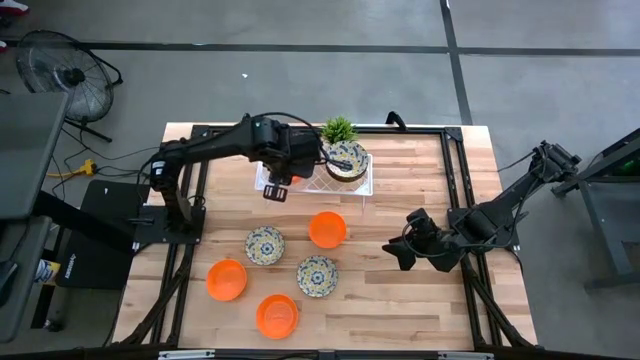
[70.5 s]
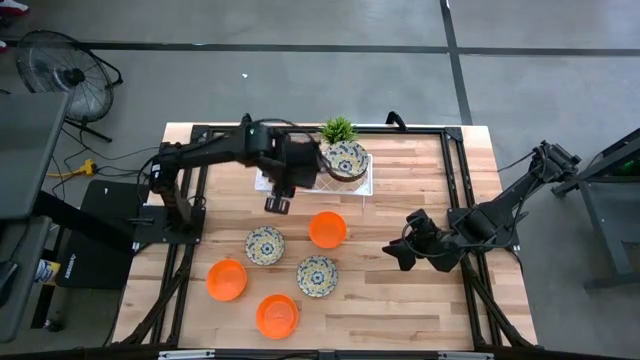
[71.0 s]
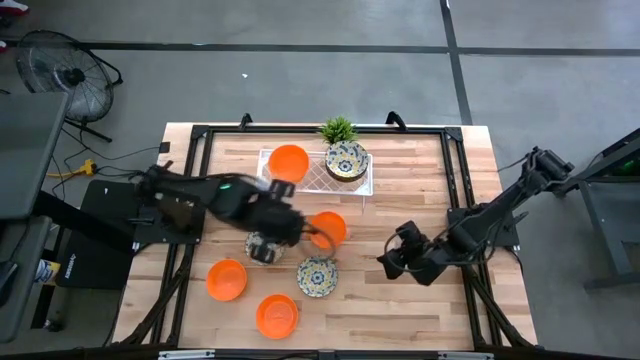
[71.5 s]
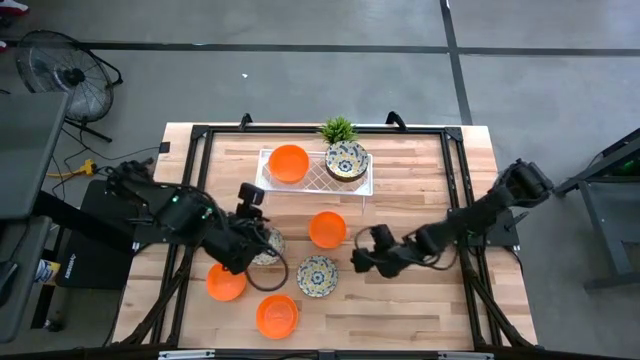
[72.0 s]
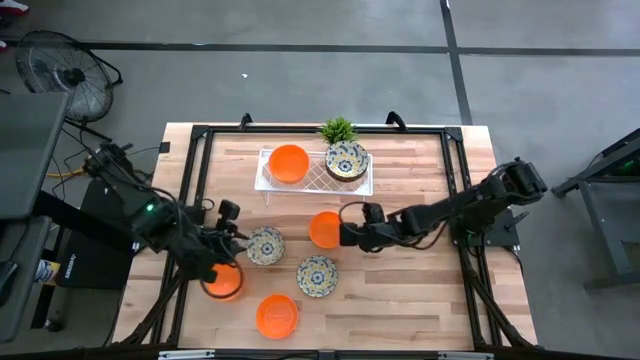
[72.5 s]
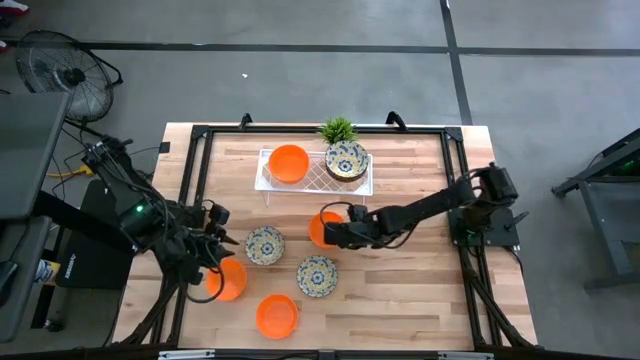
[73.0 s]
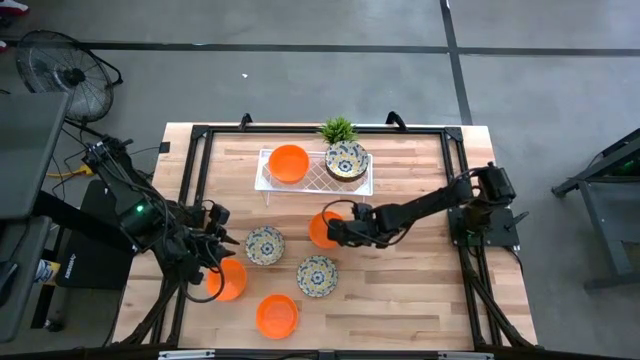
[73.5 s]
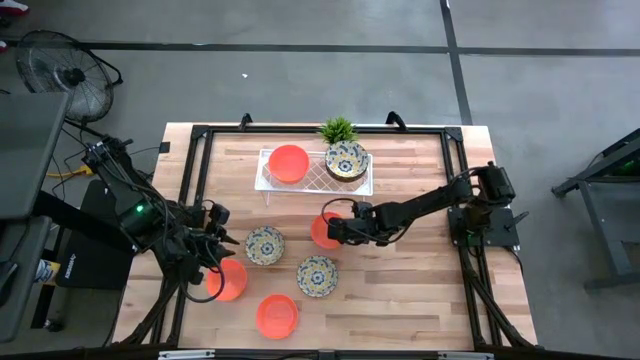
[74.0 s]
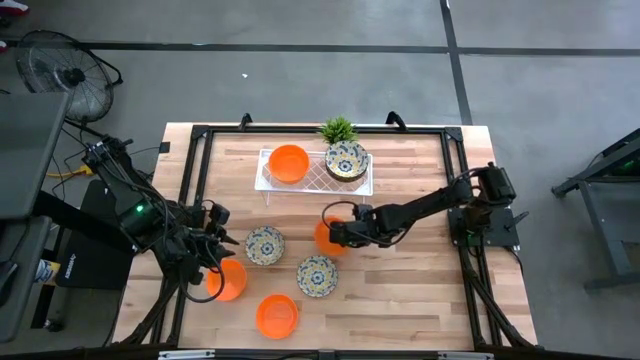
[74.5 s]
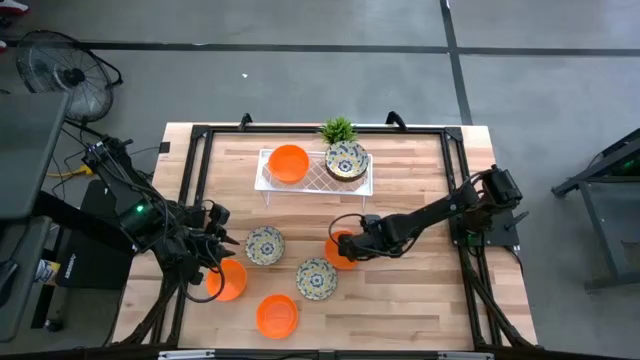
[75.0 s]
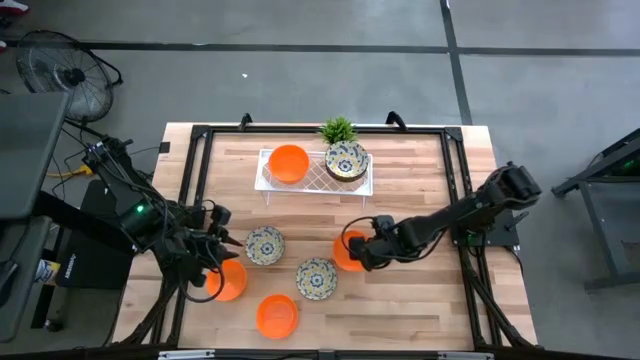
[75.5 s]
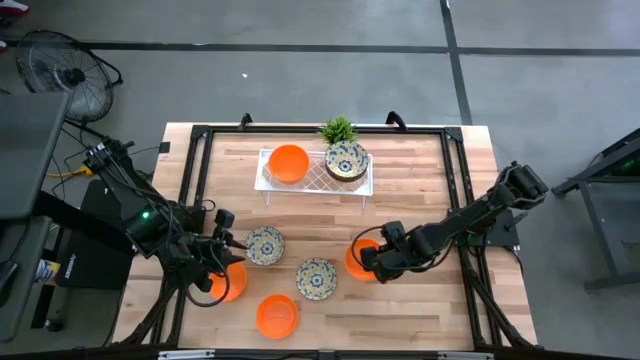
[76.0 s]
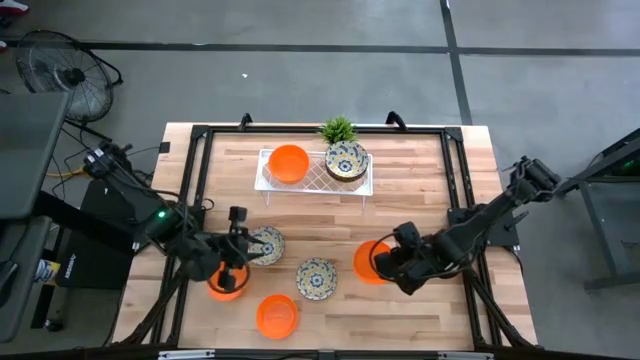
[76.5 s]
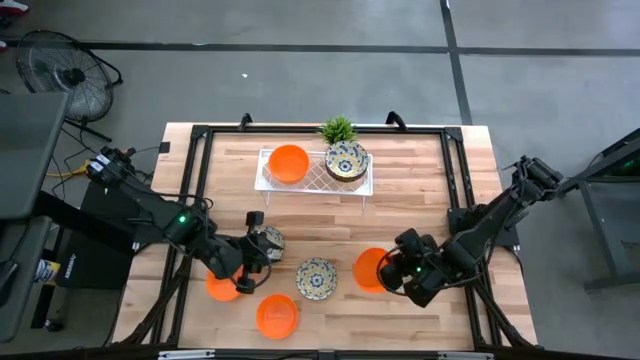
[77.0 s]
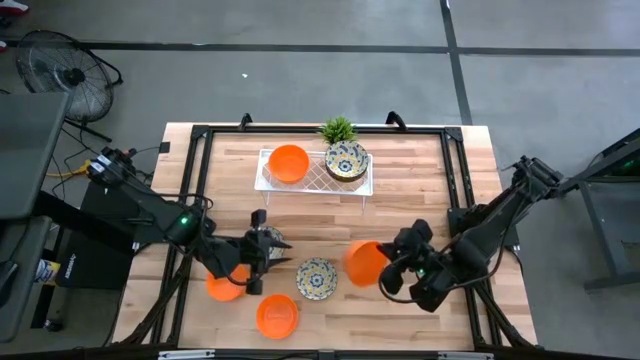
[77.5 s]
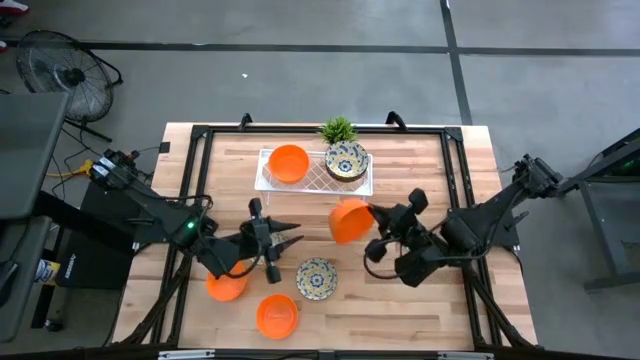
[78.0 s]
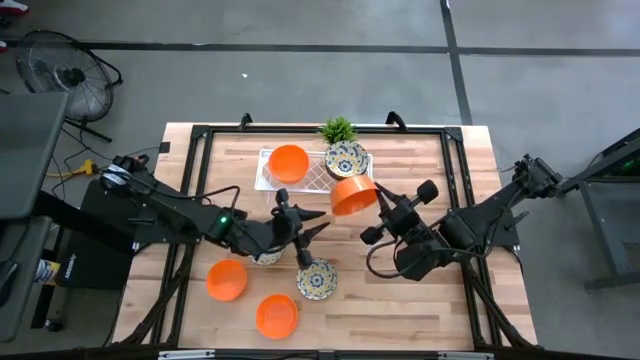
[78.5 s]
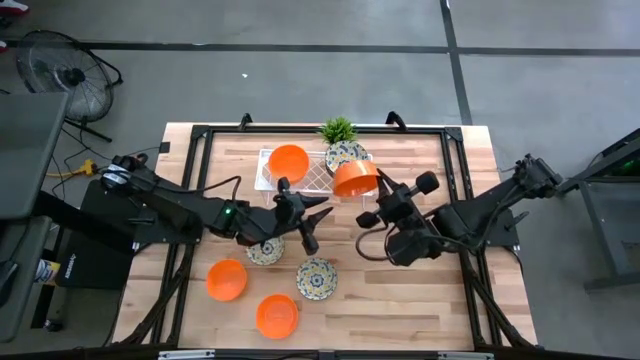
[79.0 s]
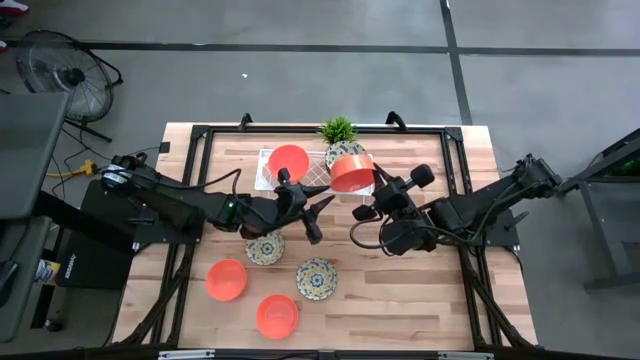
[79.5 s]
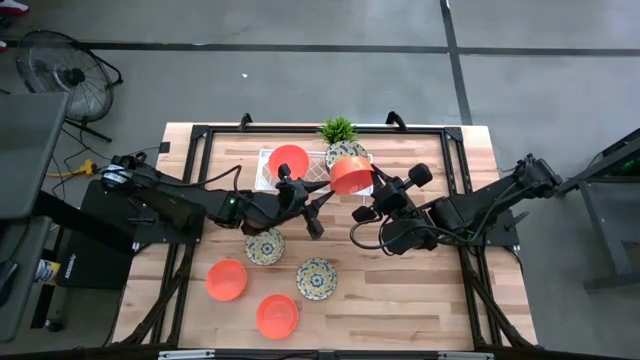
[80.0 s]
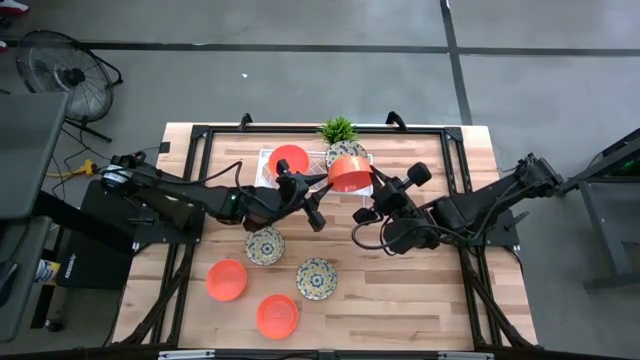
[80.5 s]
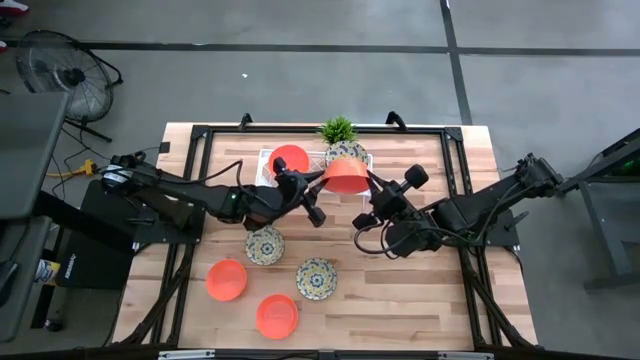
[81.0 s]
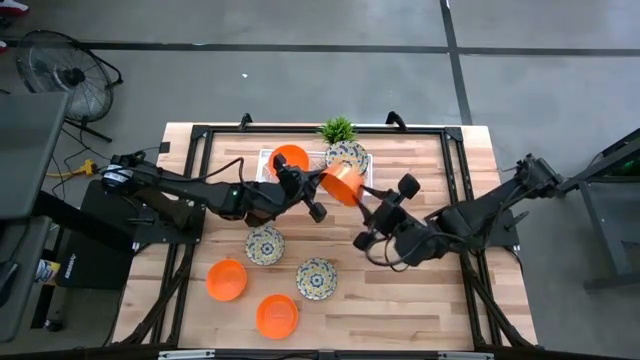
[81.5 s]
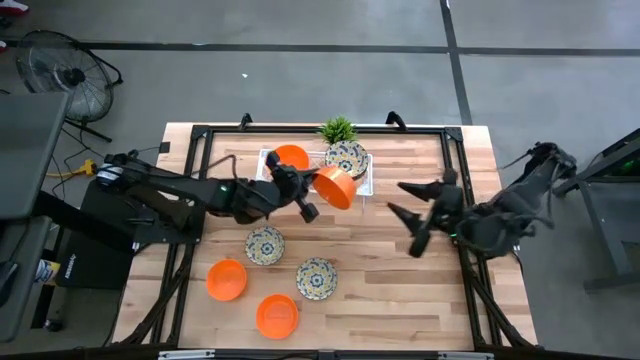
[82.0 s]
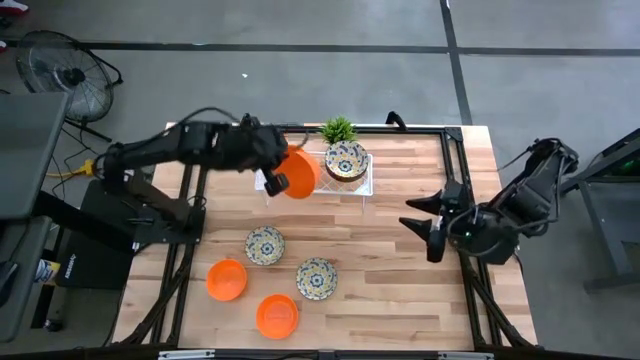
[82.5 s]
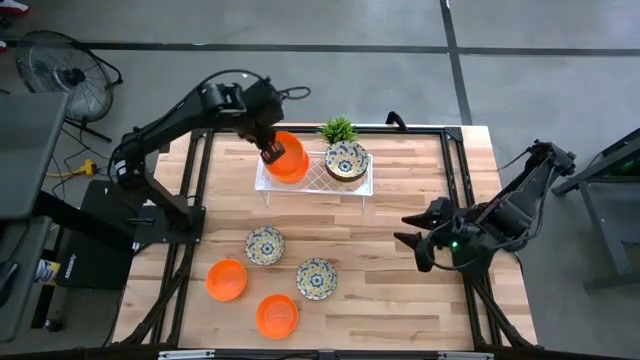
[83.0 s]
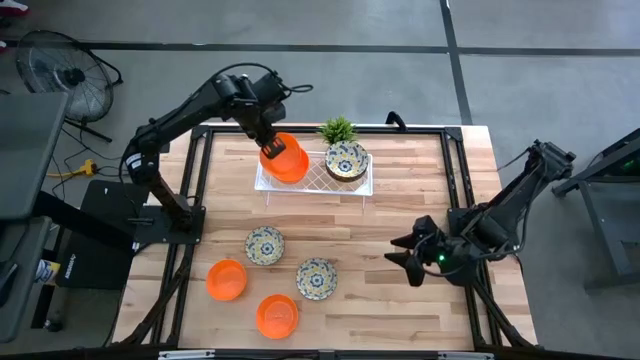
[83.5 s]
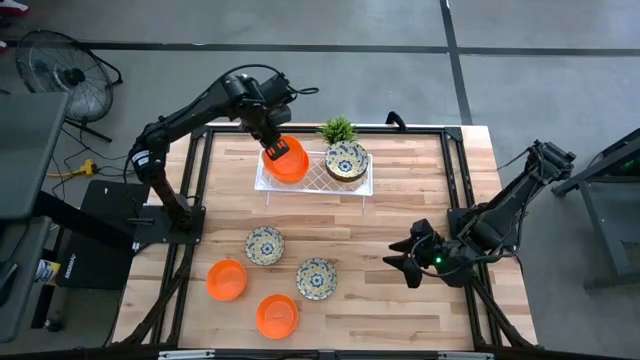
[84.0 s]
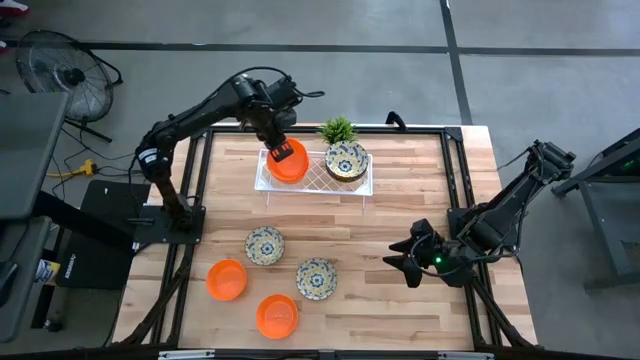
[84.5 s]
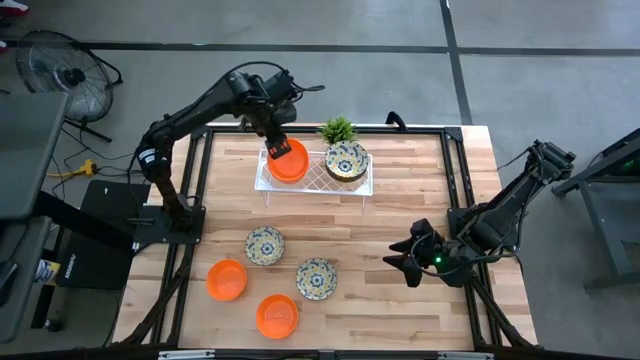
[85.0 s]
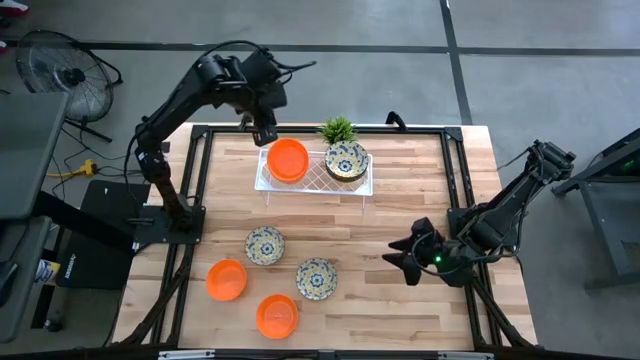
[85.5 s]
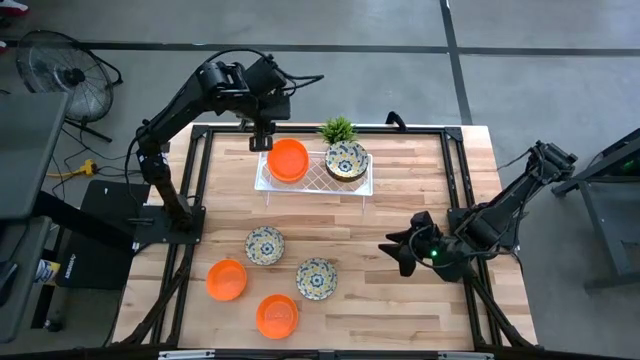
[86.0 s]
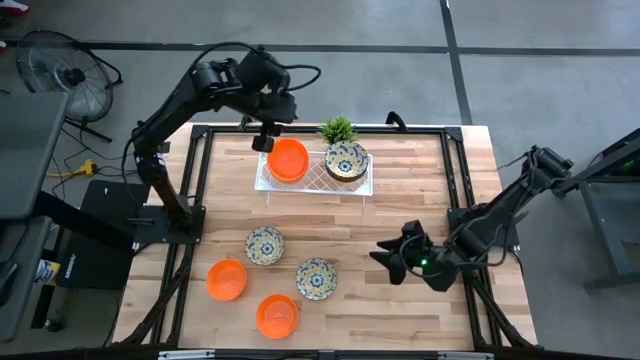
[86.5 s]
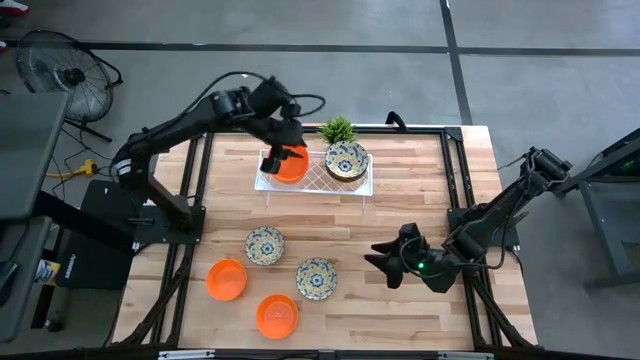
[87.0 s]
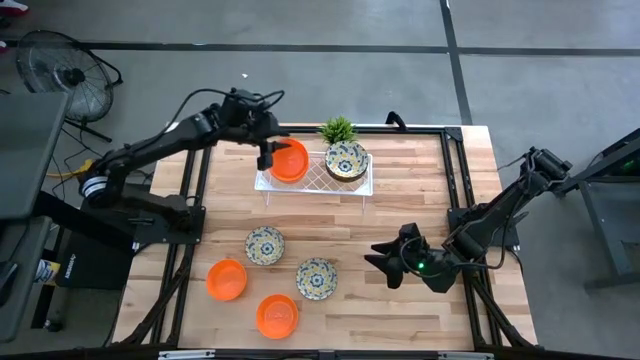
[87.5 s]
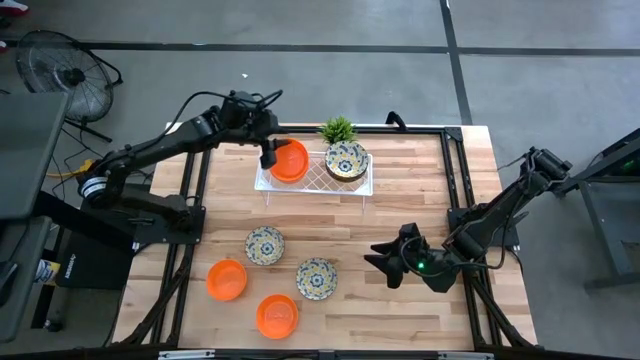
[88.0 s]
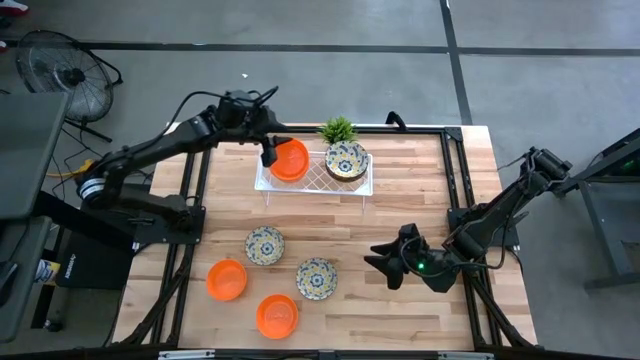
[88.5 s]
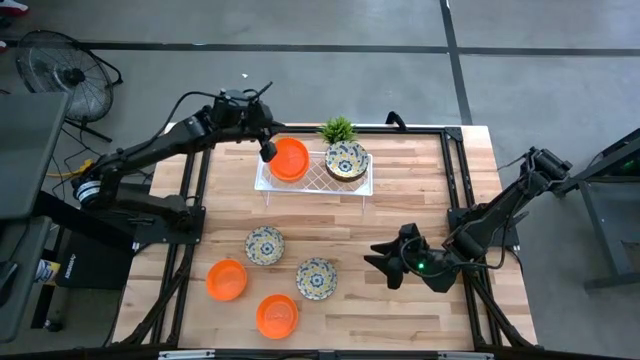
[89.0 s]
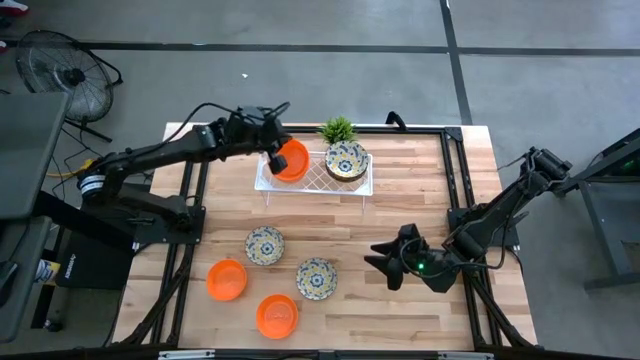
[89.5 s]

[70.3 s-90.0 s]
Task: Pick & Place Mini bowls
Stack the orange bowl on the orange bowl on the shelf

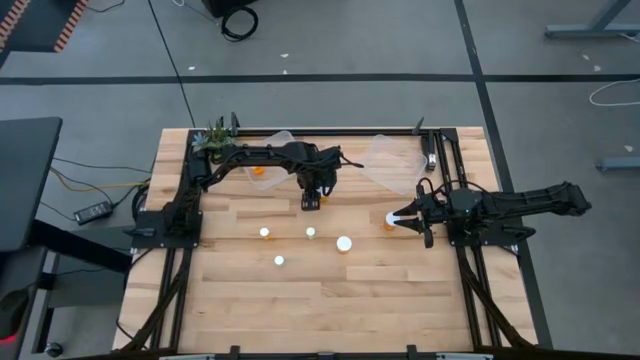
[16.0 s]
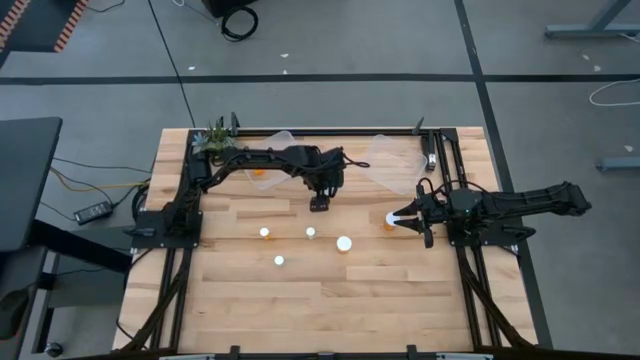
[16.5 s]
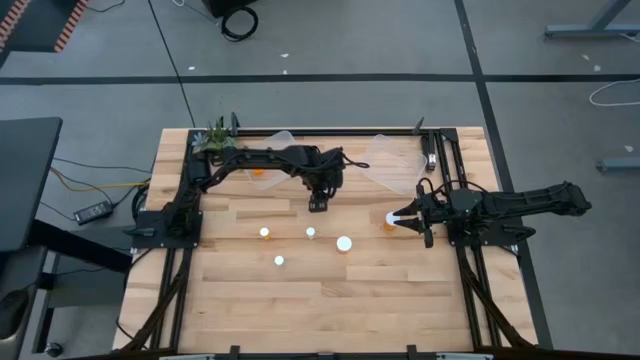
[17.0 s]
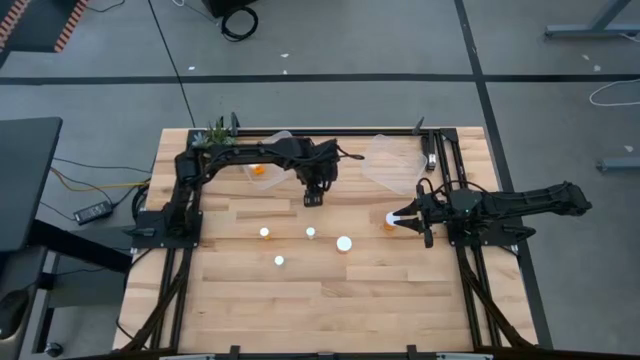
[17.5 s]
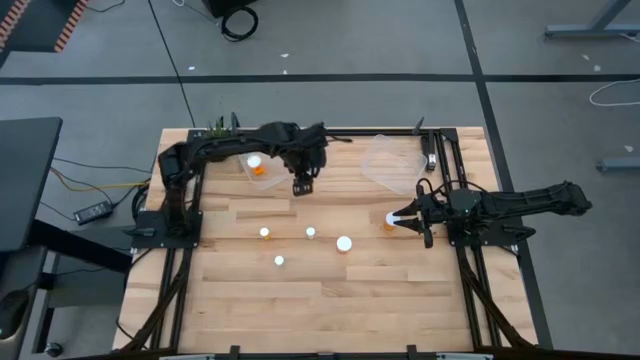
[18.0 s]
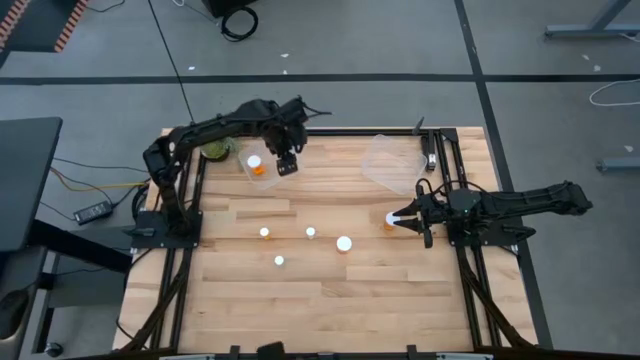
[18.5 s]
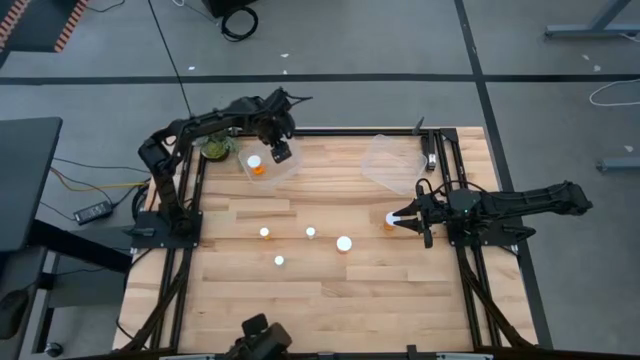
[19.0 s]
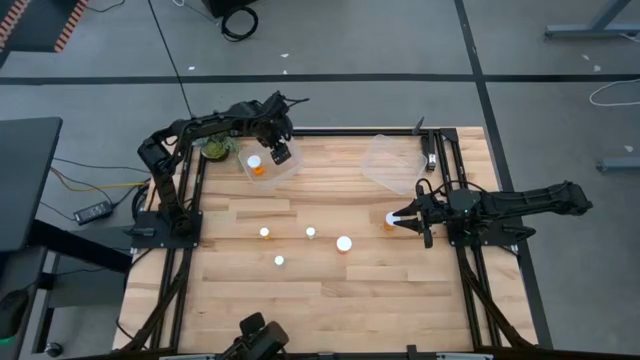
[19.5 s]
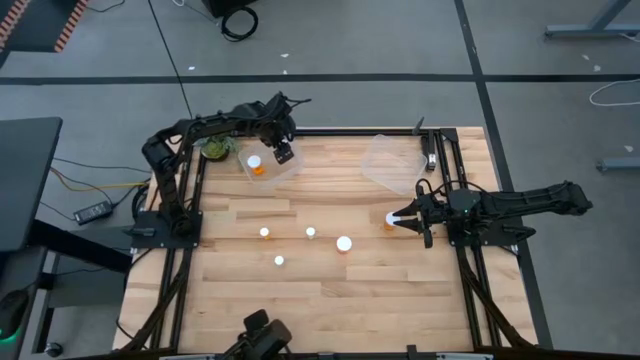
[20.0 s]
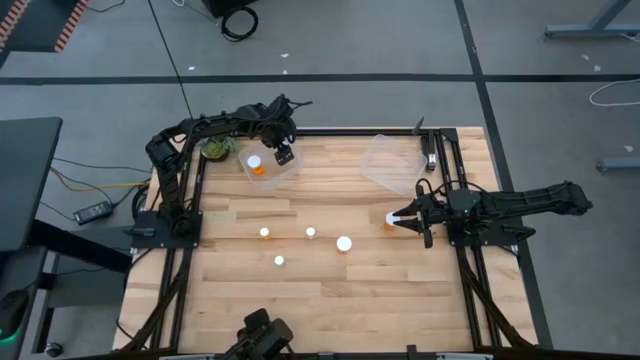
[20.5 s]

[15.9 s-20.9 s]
Task: Pick and place medicine bottles into bin by pill shape (circle, oval)
Put the orange capsule bottle into the left transparent bin
